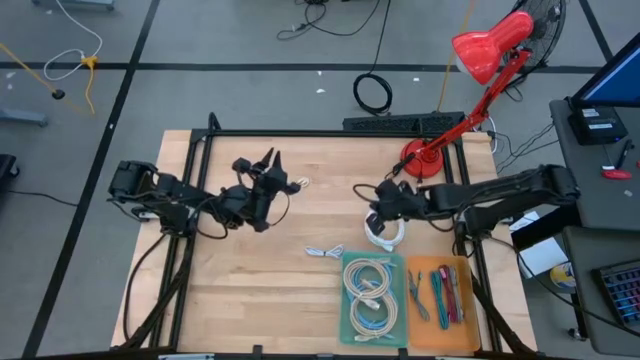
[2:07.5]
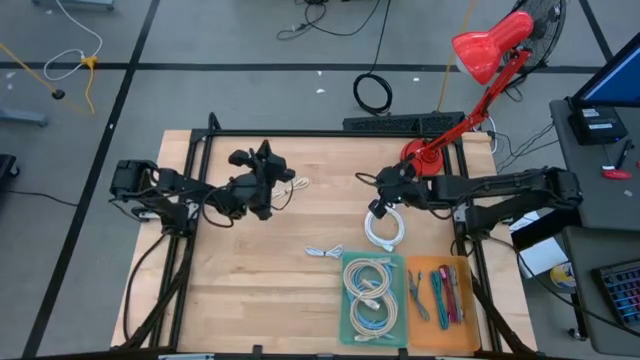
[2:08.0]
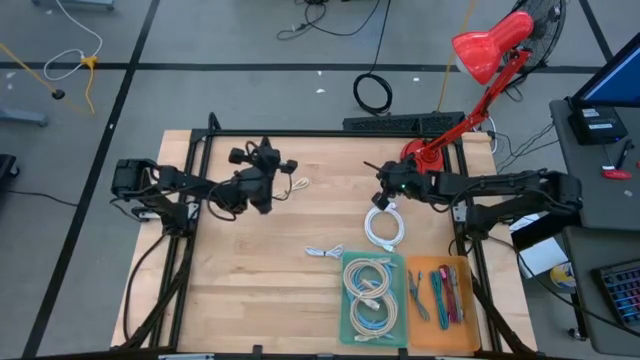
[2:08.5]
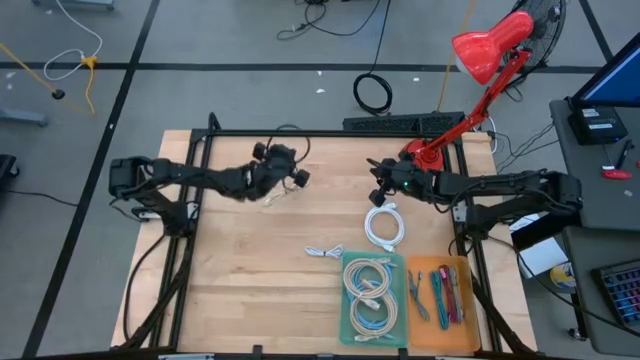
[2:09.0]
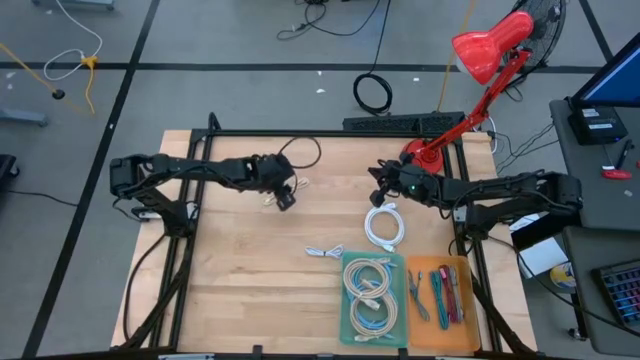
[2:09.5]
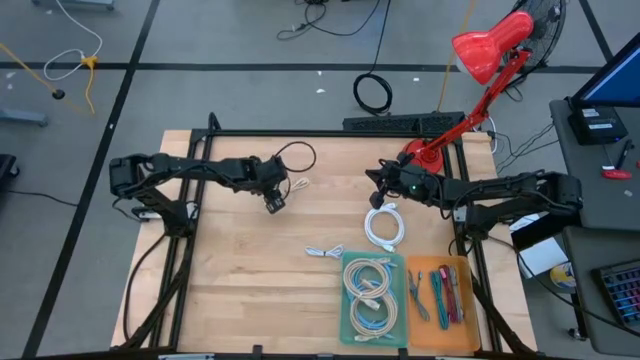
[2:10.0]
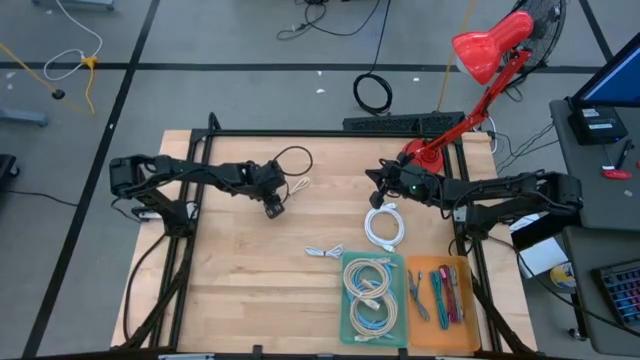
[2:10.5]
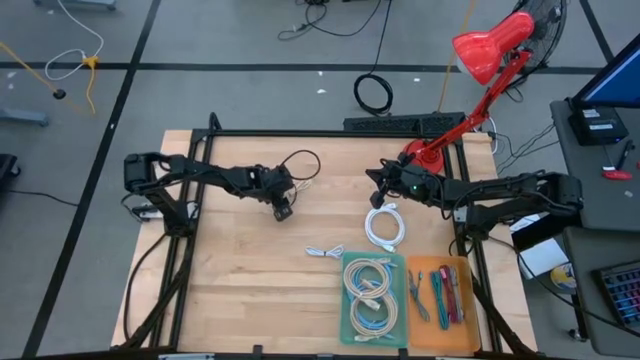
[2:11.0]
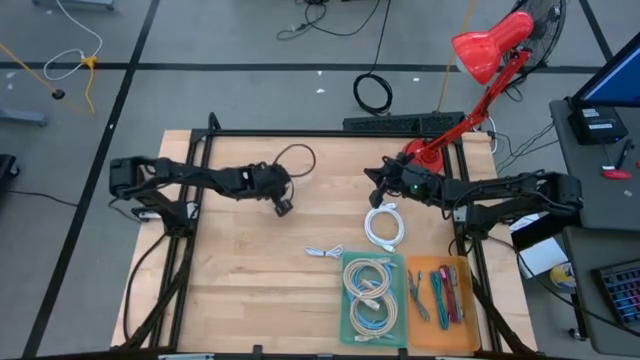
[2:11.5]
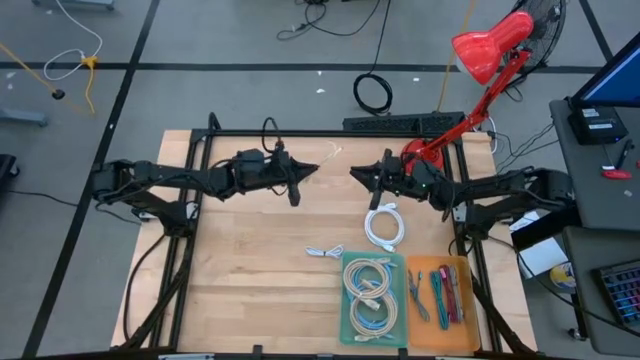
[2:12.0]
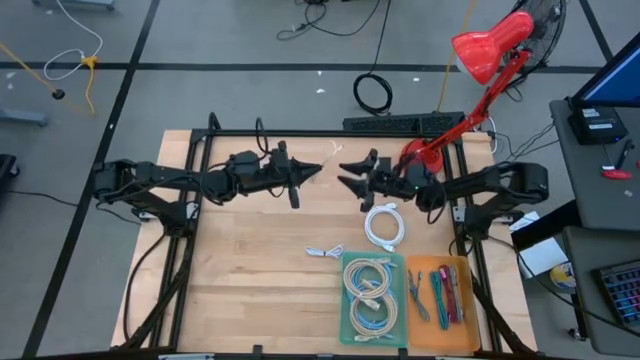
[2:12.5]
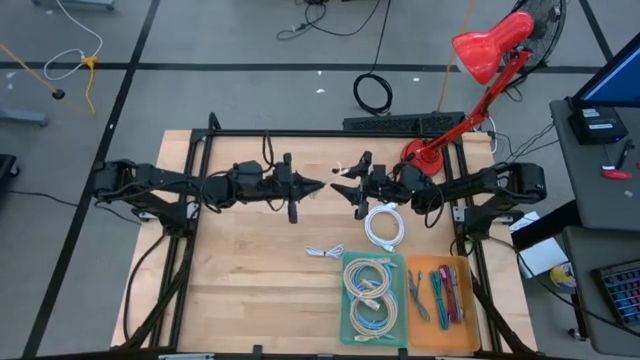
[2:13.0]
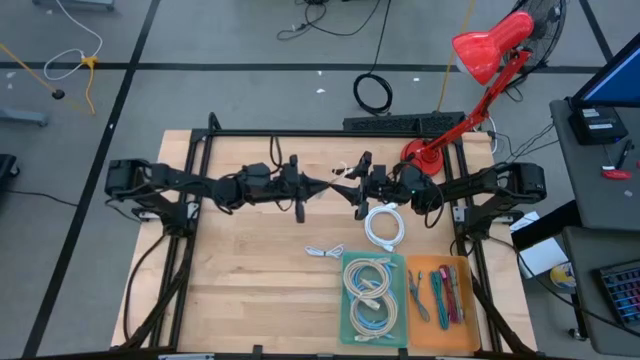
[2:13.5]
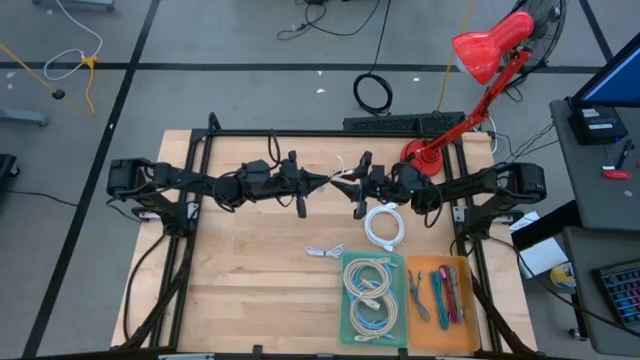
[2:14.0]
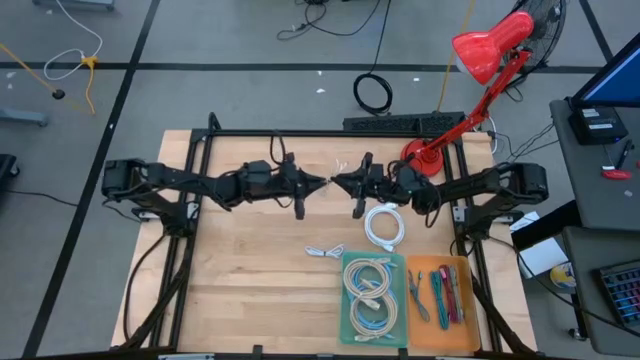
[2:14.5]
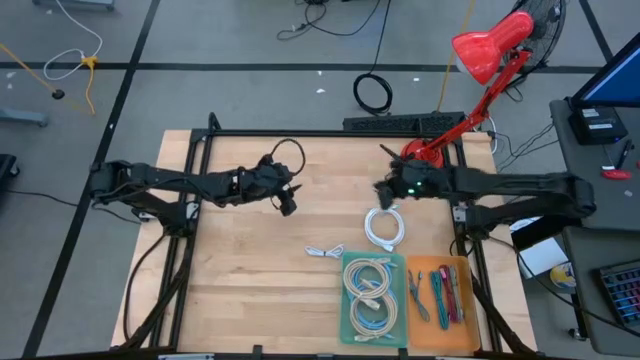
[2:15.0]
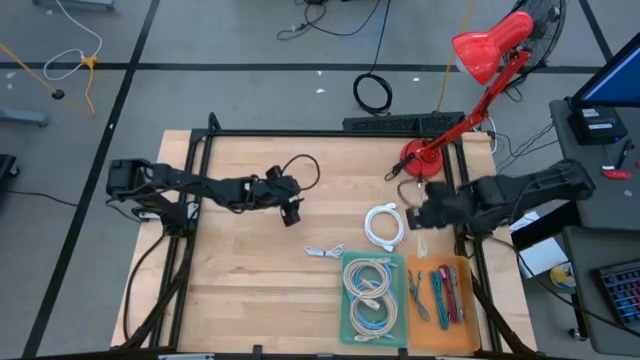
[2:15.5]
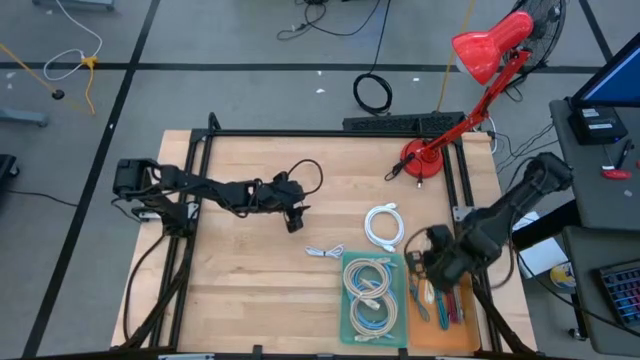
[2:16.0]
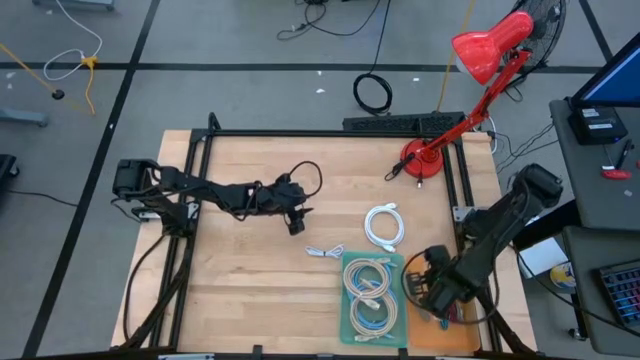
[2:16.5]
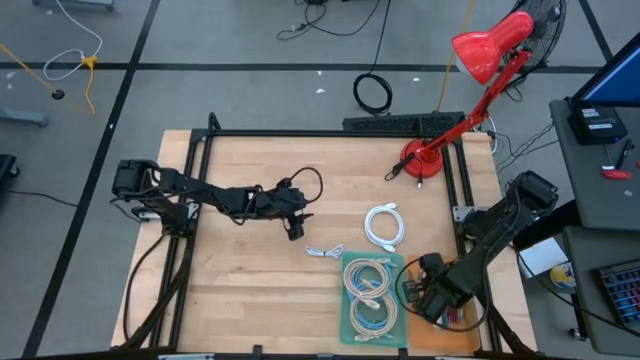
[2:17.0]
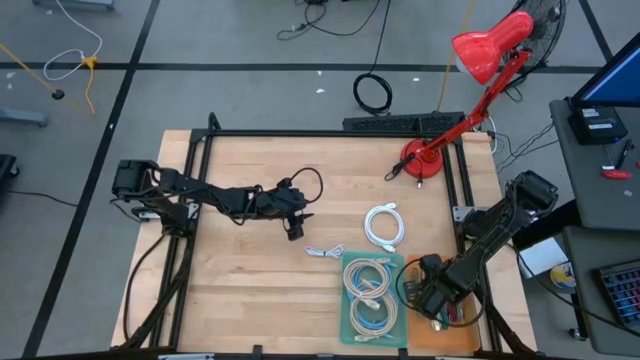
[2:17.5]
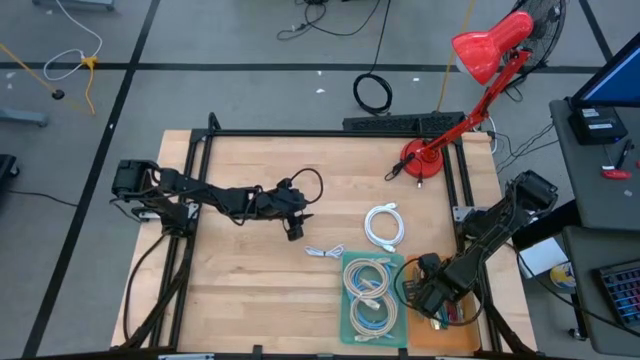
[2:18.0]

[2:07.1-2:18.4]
Task: Pick & Place USB Port
Put the brown charger cable into the orange bin

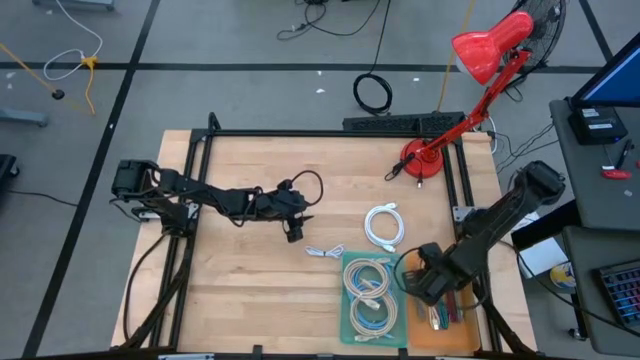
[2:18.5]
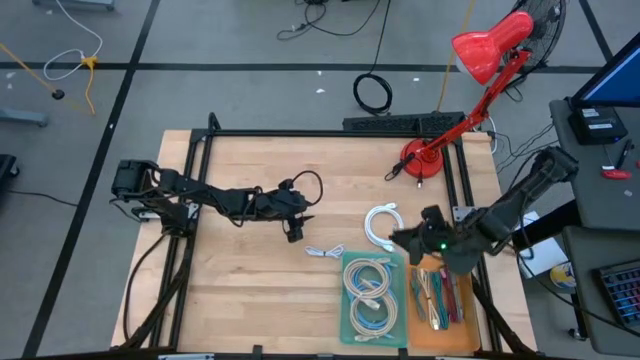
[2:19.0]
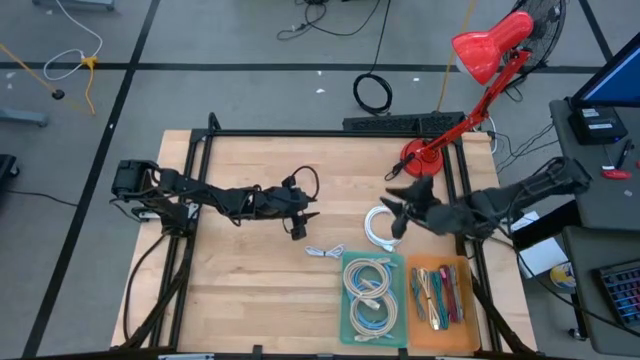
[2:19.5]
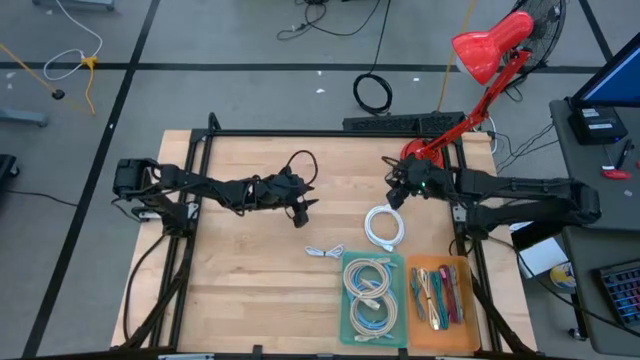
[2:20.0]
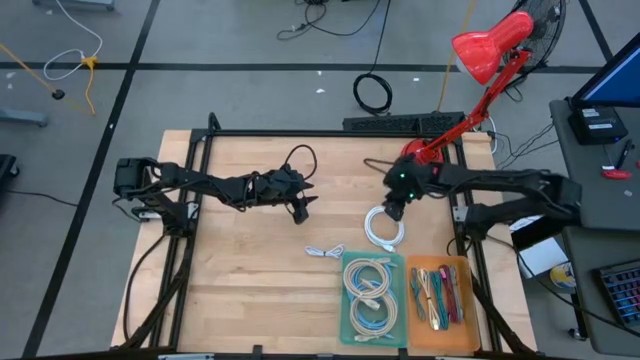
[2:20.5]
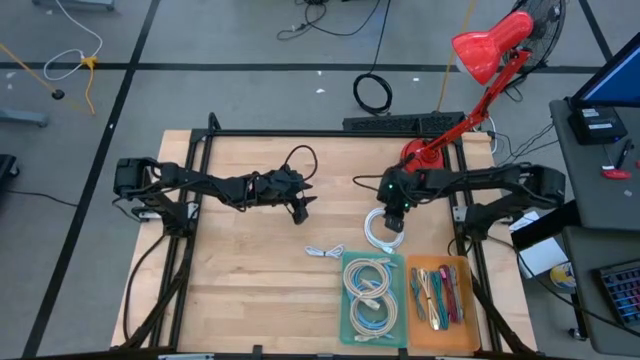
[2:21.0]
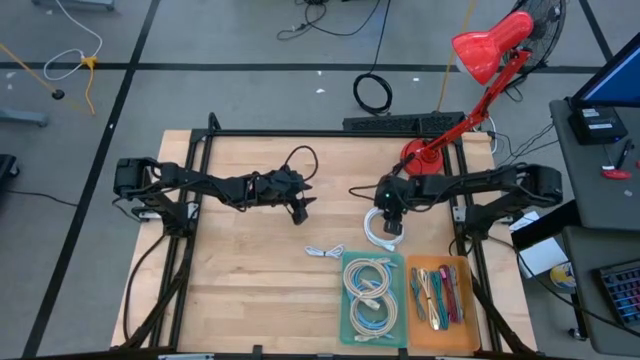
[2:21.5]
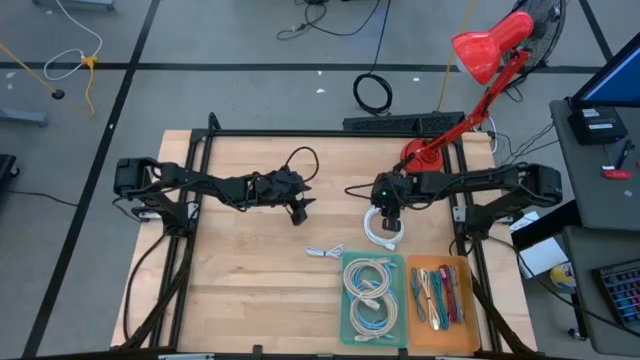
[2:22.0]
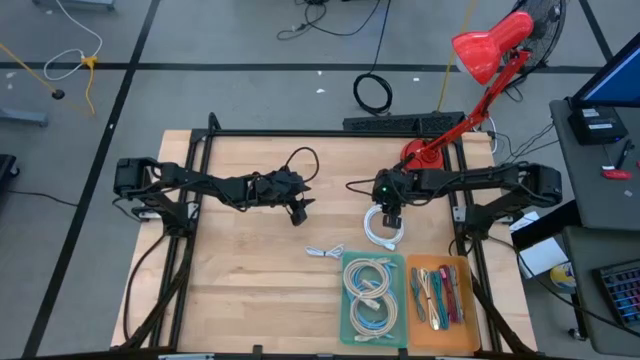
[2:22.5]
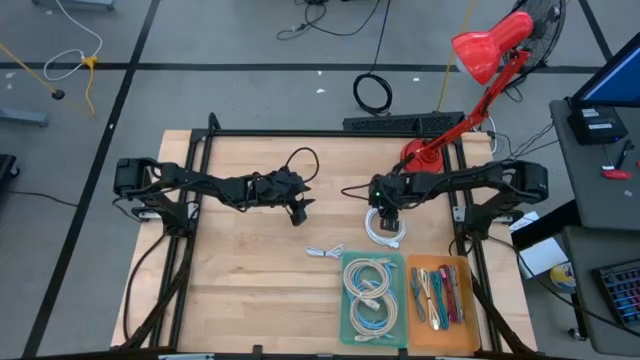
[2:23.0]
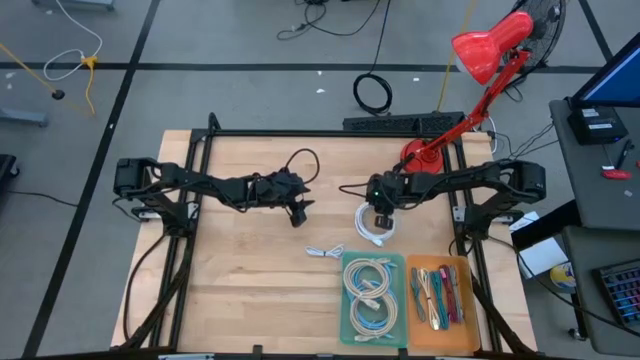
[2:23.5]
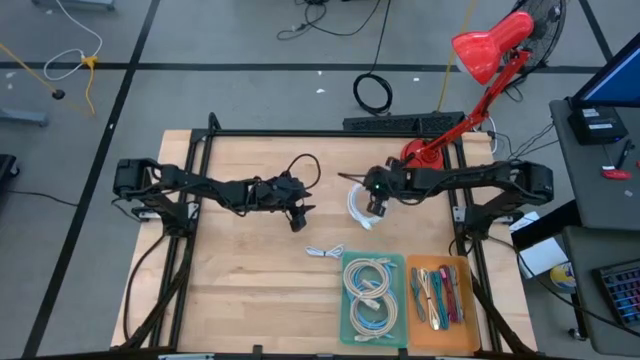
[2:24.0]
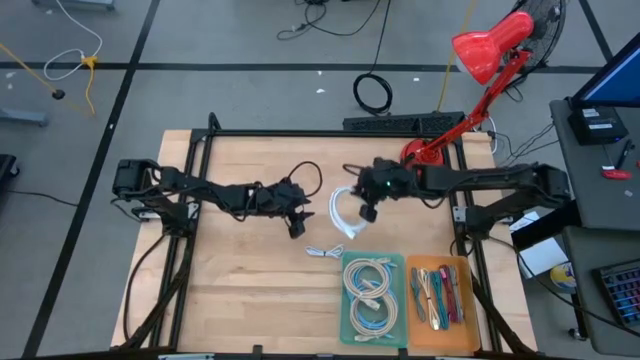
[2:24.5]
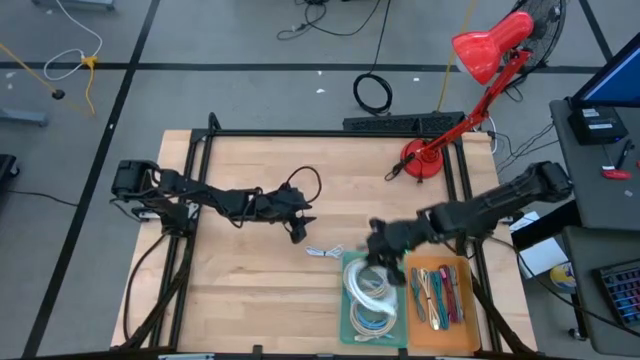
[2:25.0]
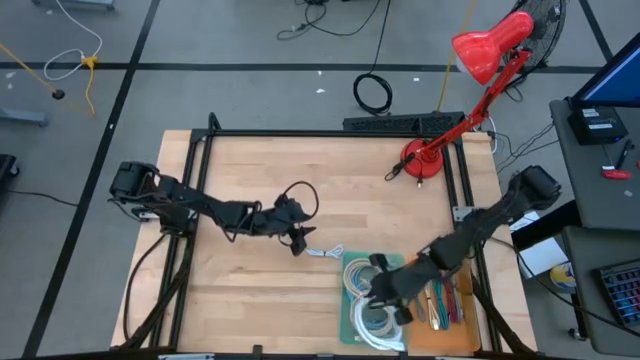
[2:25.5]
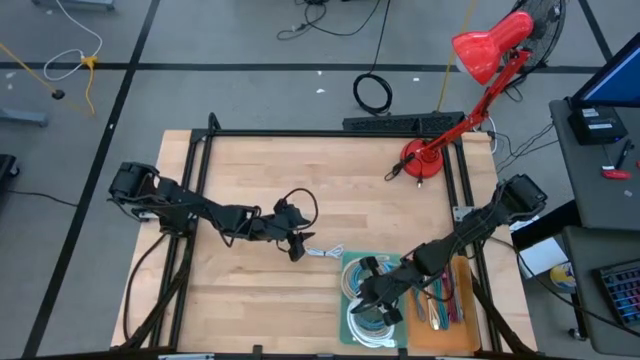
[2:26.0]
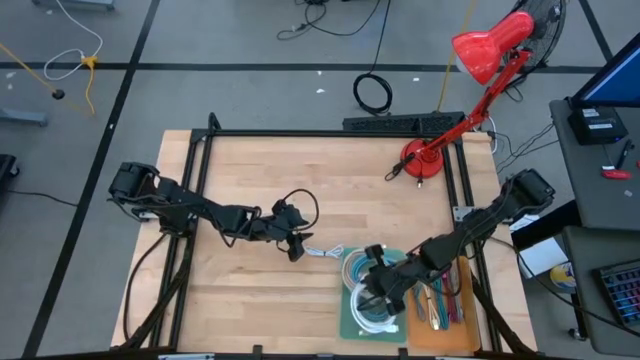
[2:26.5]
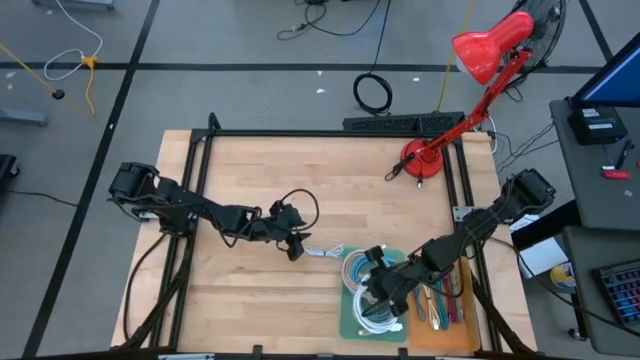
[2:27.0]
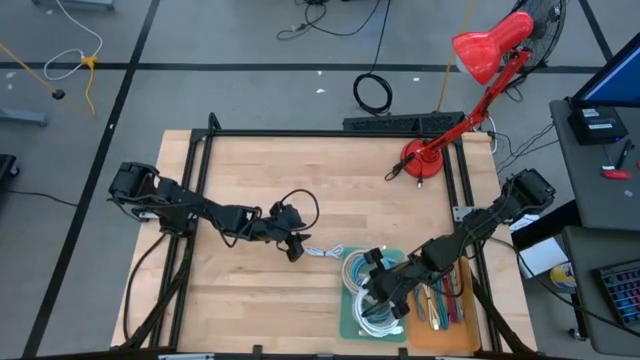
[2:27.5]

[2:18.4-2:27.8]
Put the white charger cable into the blue bin
